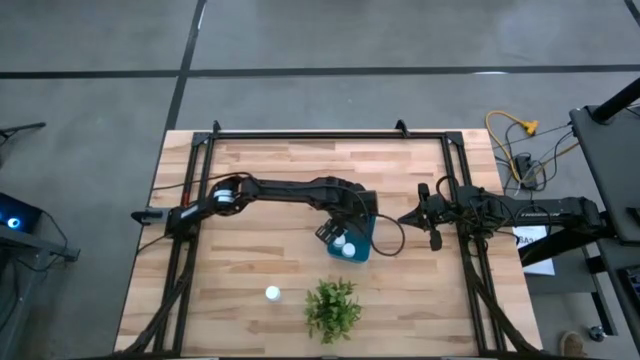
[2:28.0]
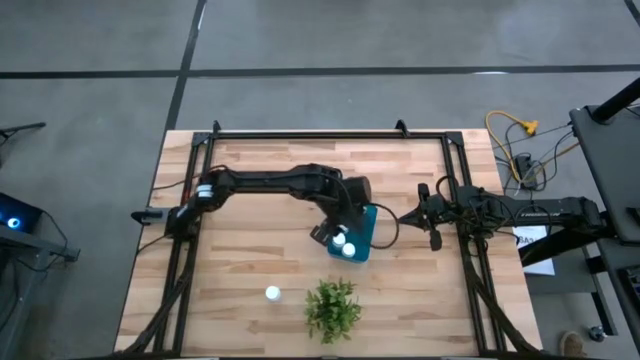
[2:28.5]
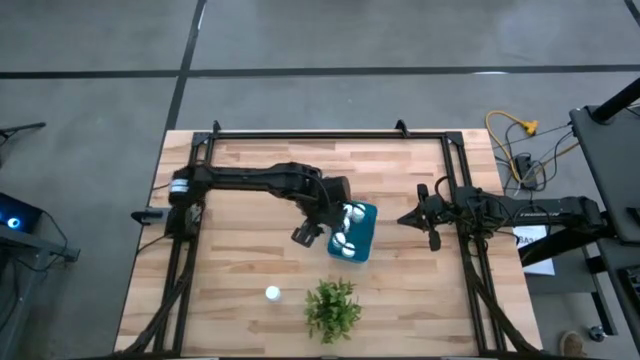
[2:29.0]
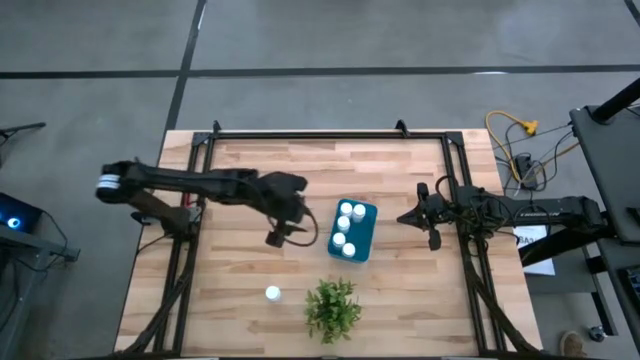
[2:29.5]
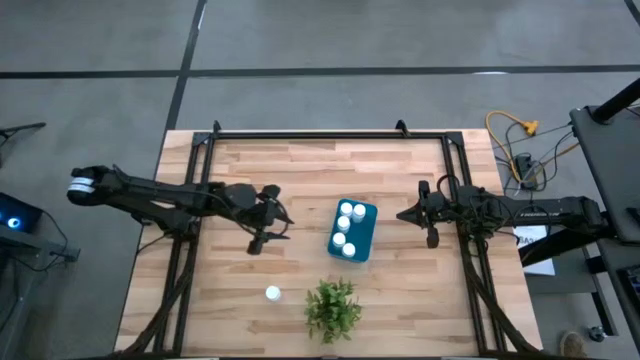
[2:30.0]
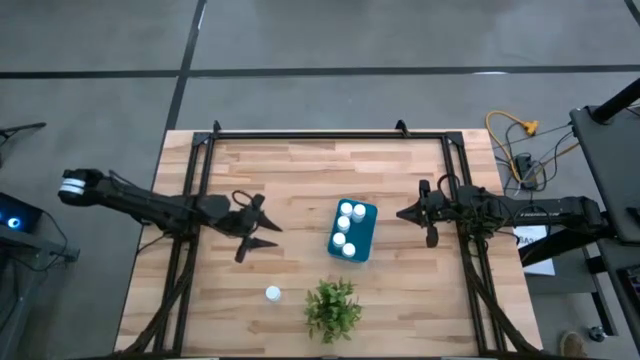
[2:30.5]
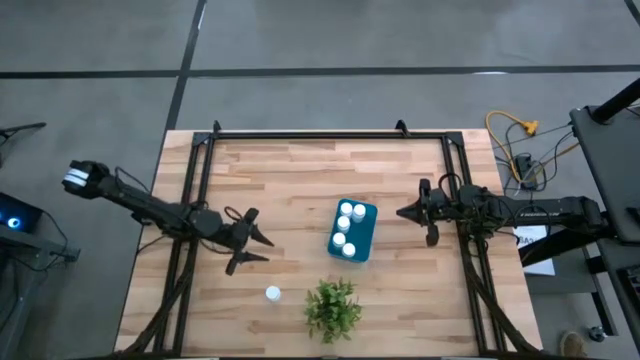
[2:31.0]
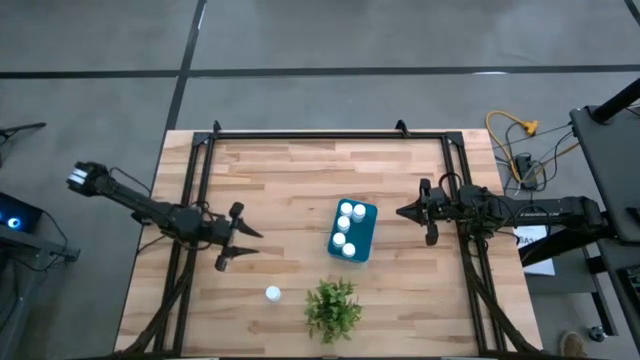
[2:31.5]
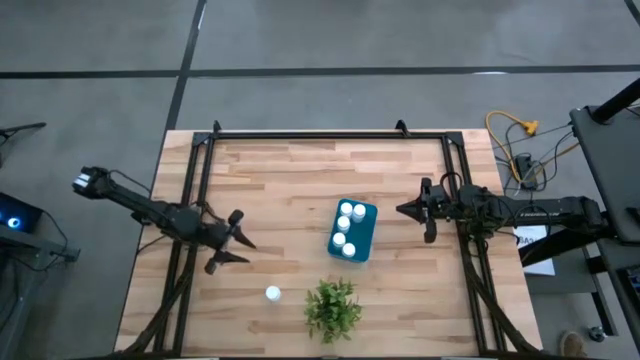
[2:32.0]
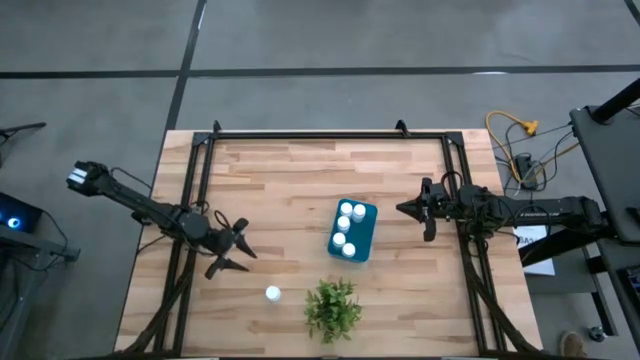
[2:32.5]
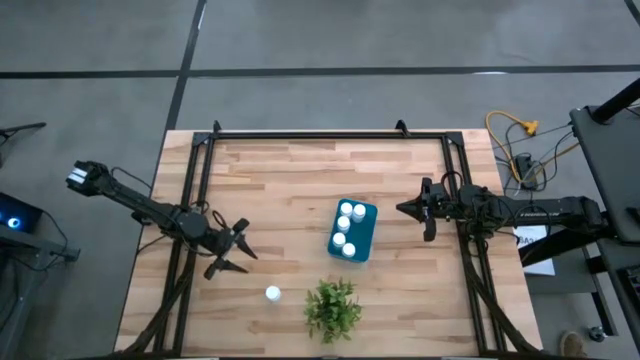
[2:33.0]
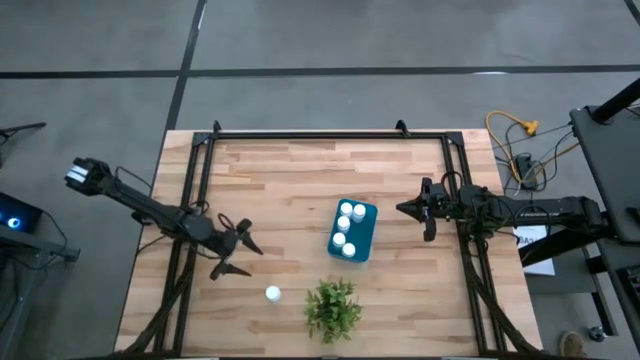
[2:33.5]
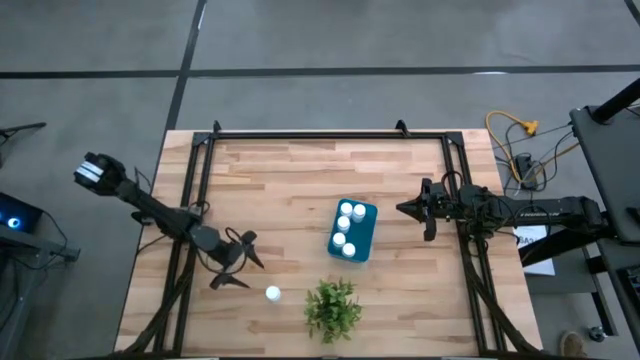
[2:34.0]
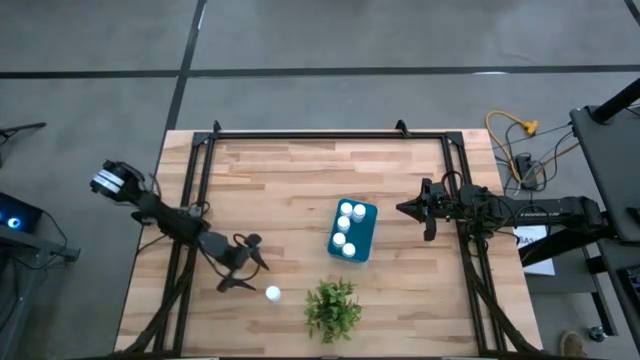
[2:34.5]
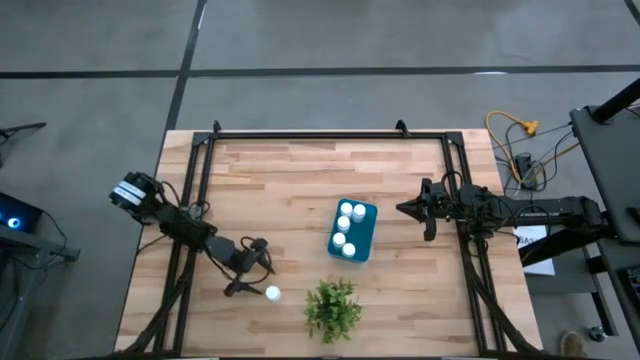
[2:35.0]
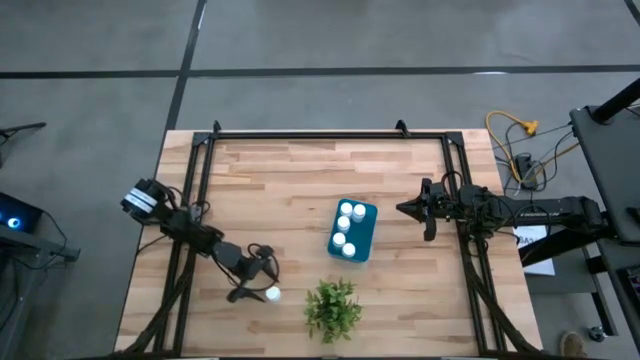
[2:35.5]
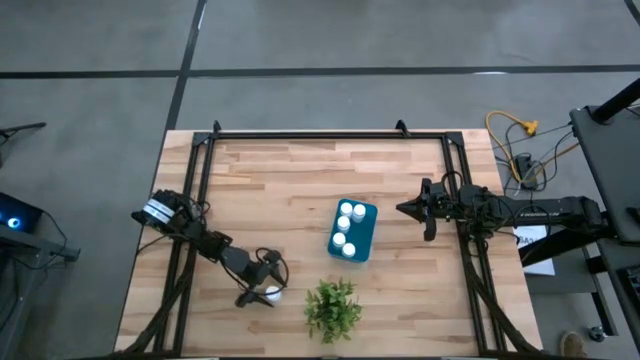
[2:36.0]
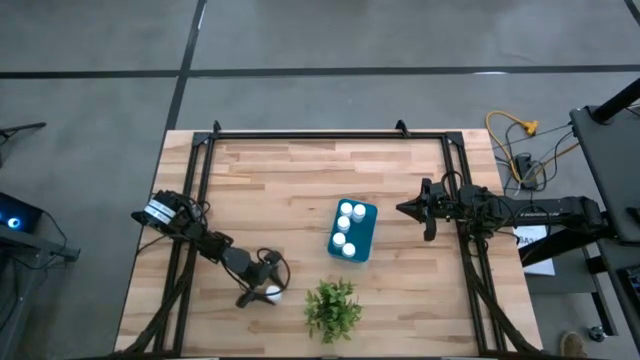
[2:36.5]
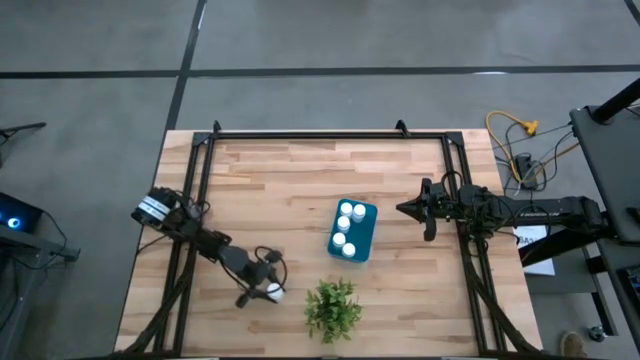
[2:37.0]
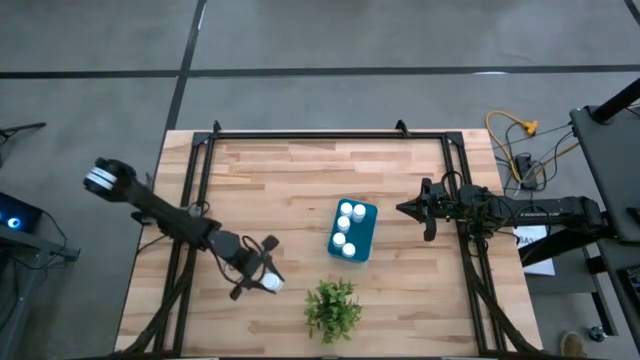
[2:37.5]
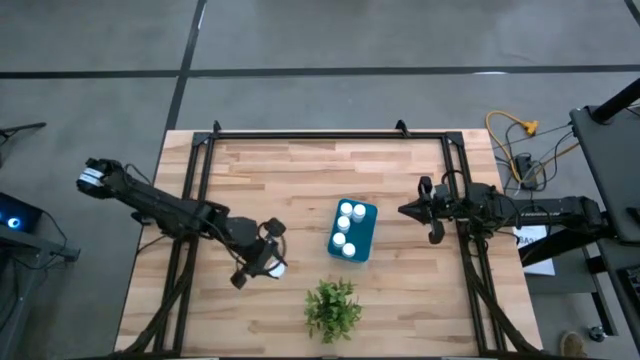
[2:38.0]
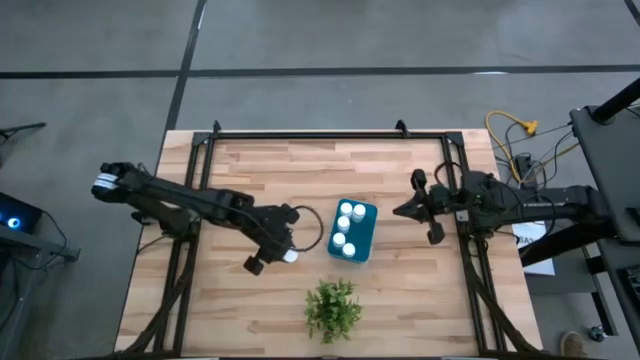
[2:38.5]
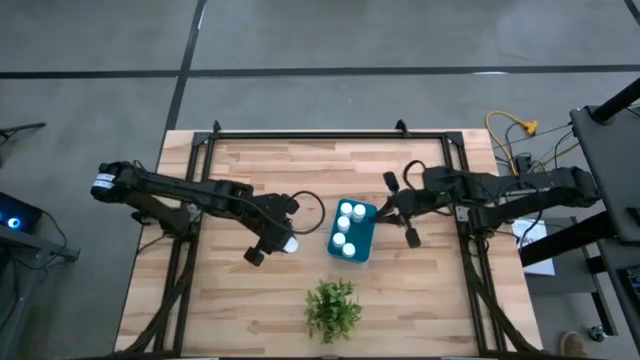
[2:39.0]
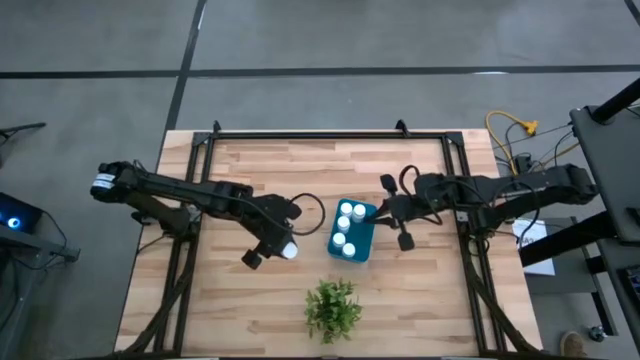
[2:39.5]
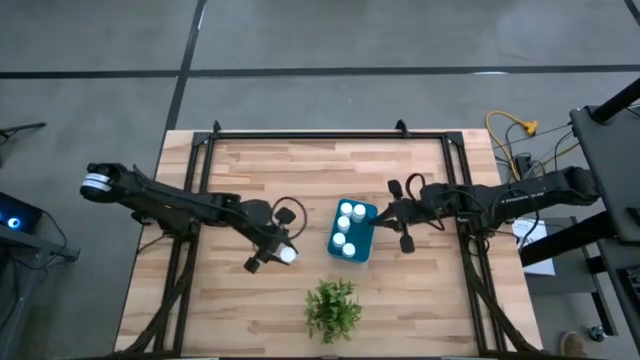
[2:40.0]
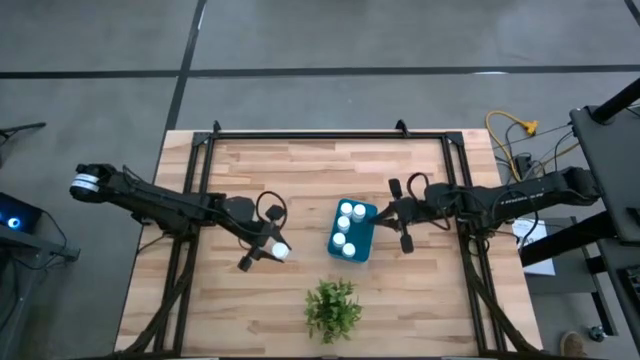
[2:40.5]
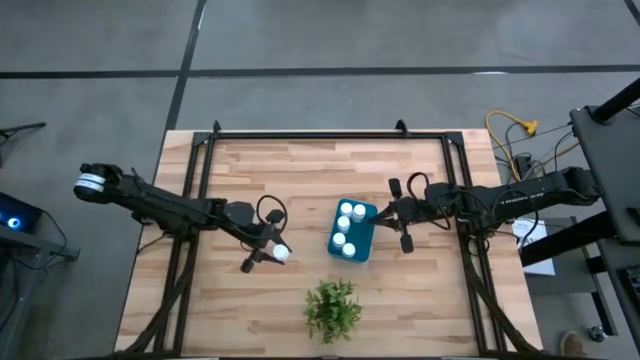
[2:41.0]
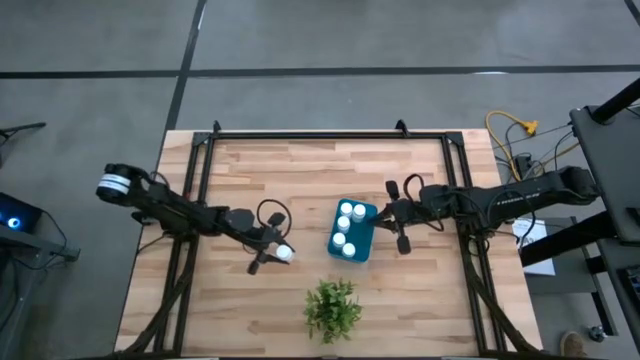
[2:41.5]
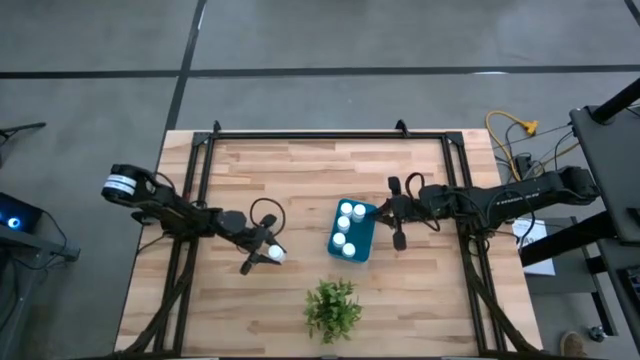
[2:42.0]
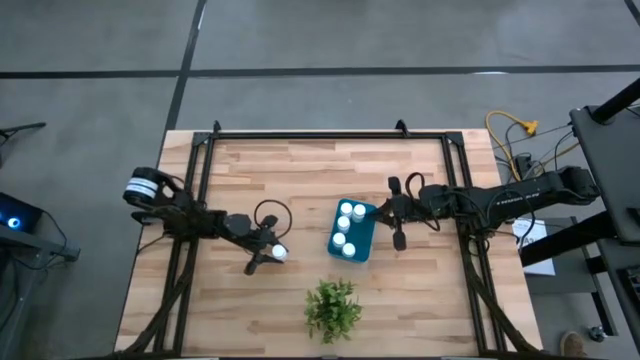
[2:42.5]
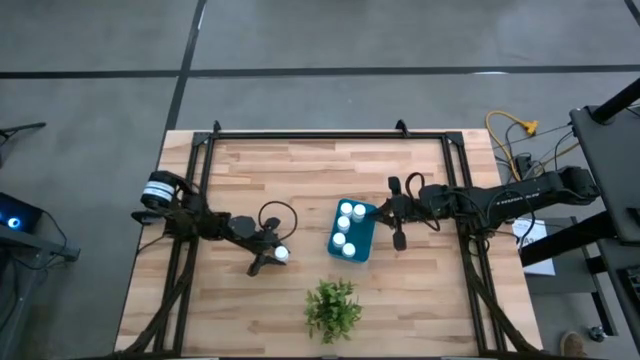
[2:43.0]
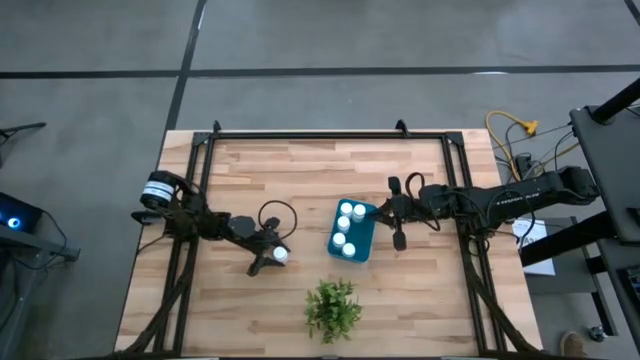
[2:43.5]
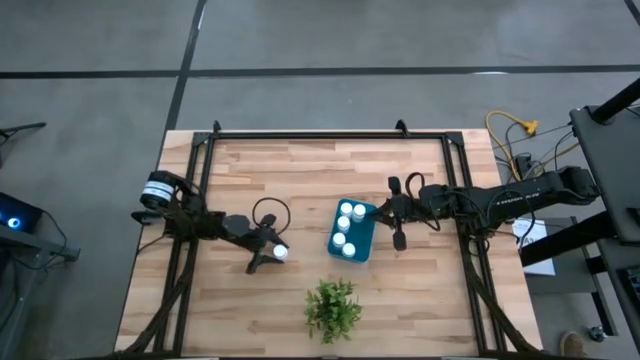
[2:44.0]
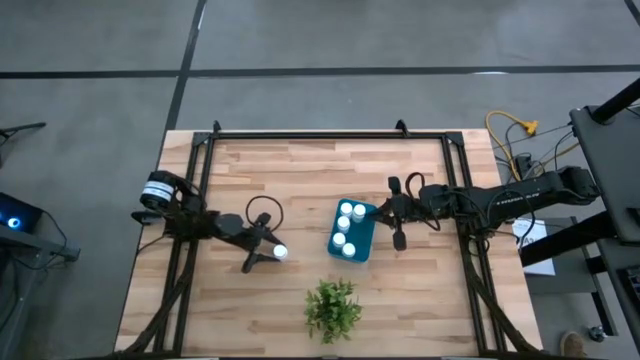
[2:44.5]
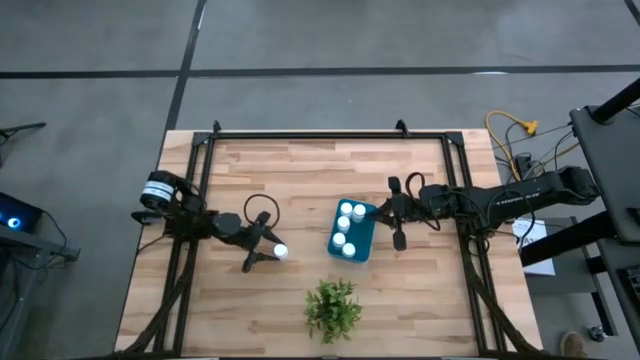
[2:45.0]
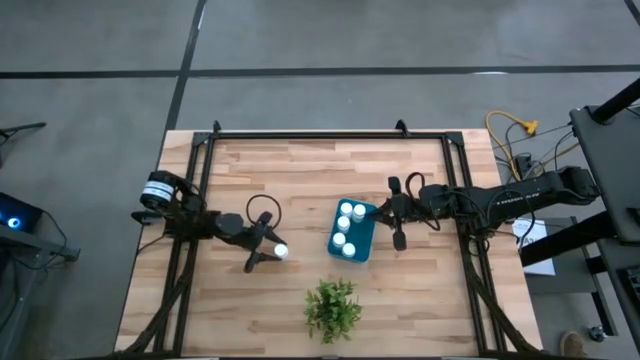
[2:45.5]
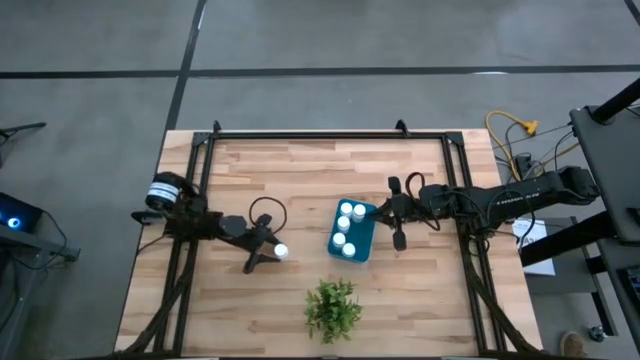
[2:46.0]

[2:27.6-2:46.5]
Task: Pick and place pill bottles into a basket
Put the white pill bottle into the blue bin

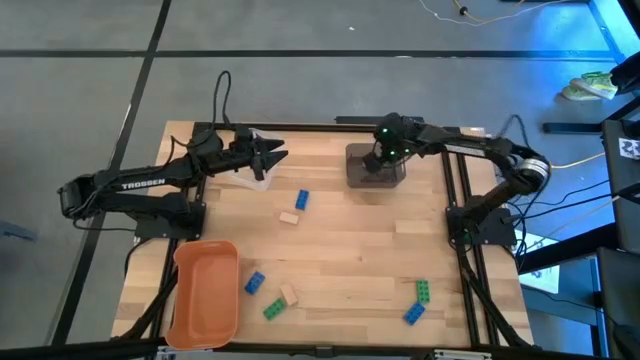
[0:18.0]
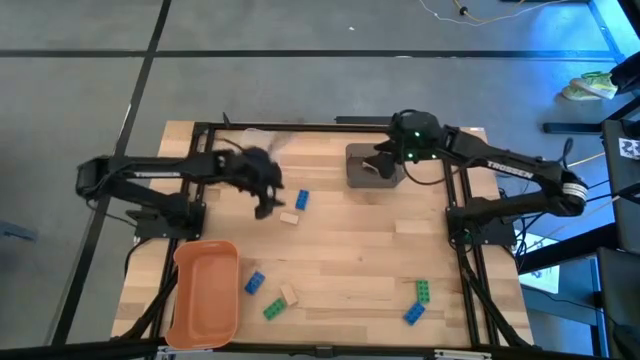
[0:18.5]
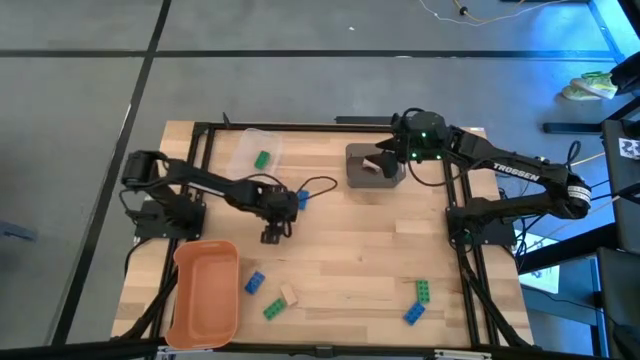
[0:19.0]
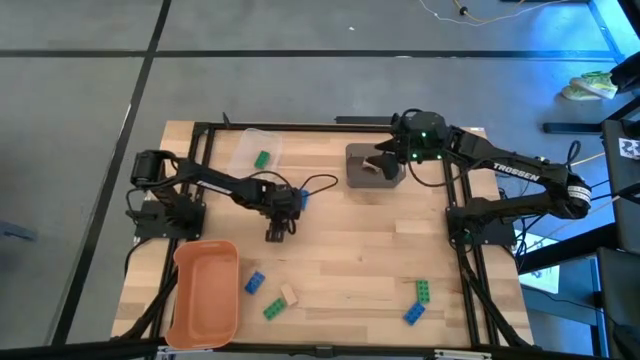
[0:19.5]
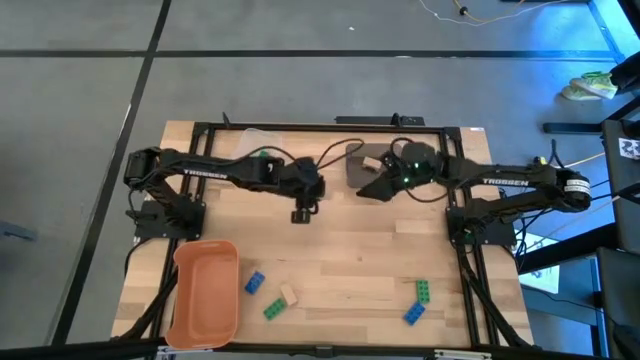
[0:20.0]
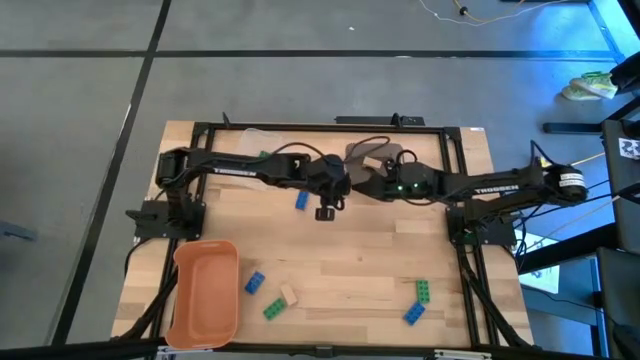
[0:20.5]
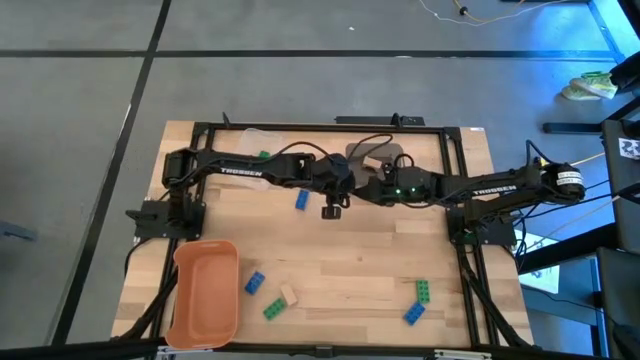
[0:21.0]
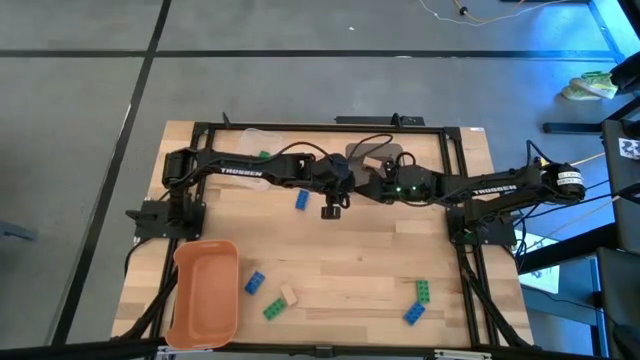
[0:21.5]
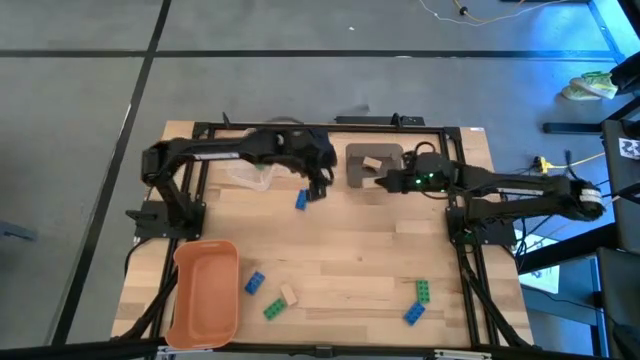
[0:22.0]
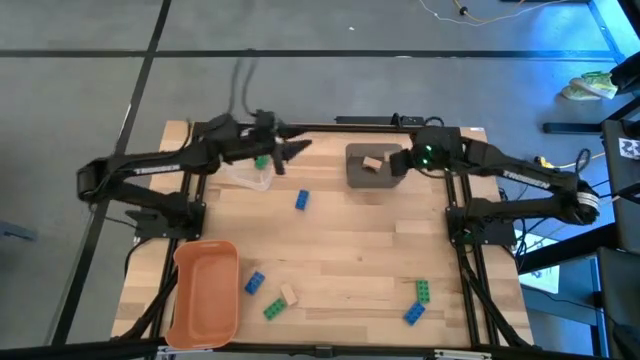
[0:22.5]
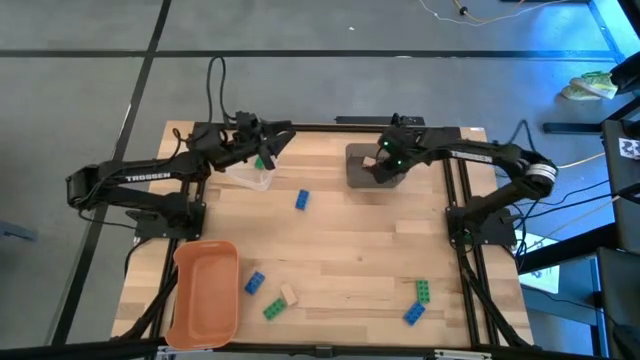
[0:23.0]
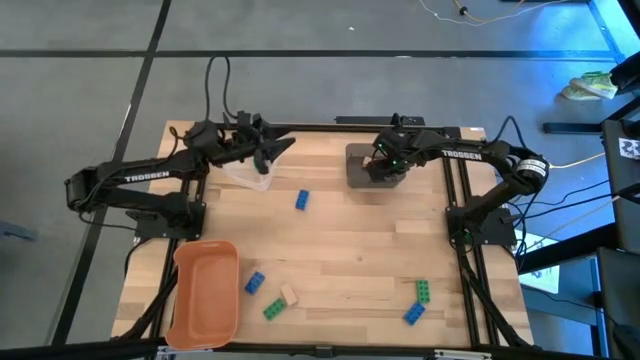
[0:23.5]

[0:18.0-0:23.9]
Task: Sort & place blocks by color
Put the top brown block into the black bin
